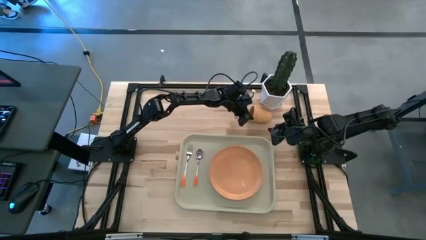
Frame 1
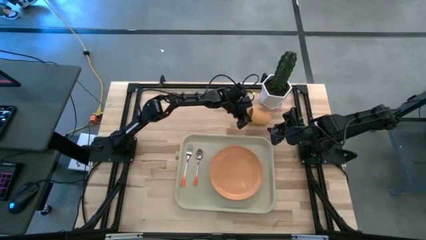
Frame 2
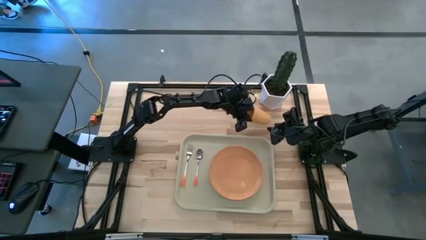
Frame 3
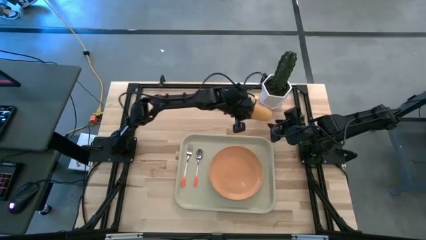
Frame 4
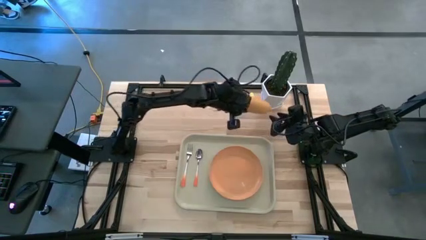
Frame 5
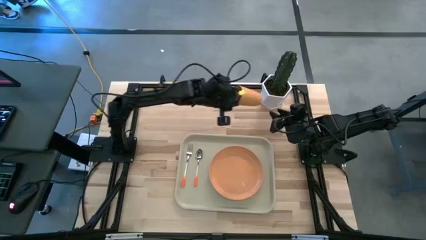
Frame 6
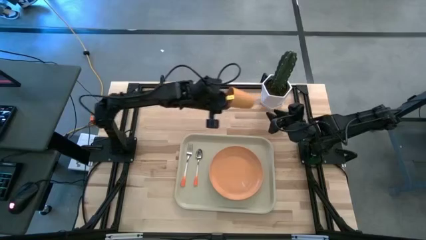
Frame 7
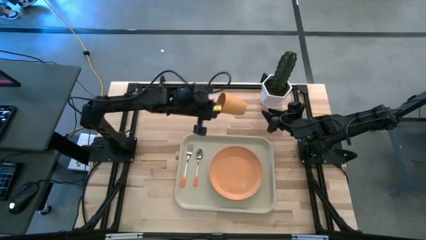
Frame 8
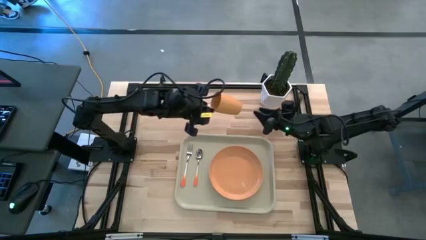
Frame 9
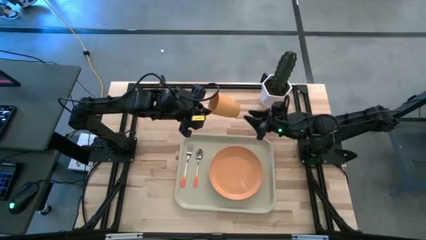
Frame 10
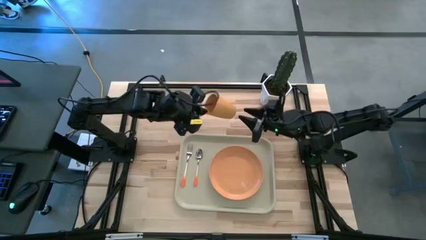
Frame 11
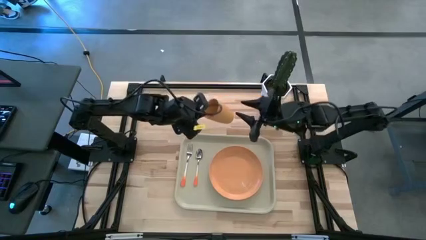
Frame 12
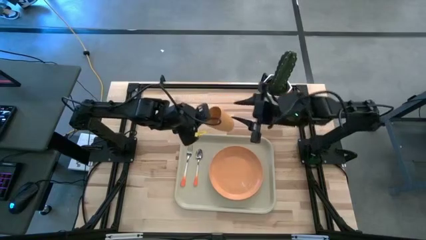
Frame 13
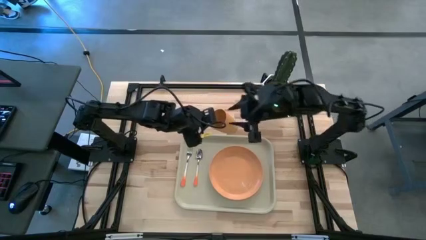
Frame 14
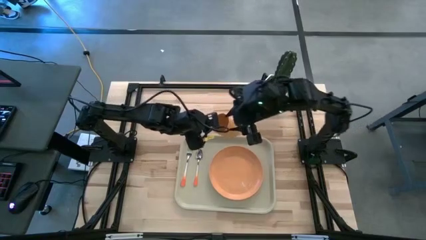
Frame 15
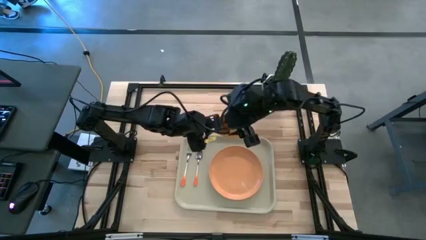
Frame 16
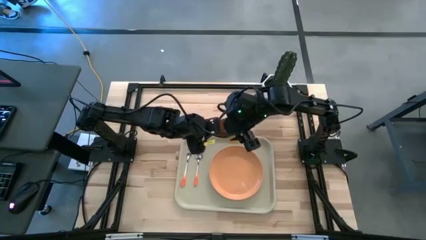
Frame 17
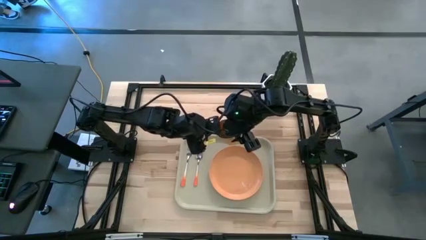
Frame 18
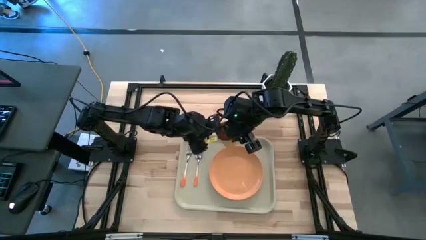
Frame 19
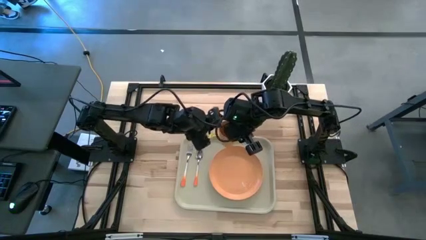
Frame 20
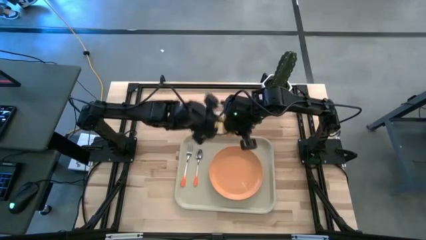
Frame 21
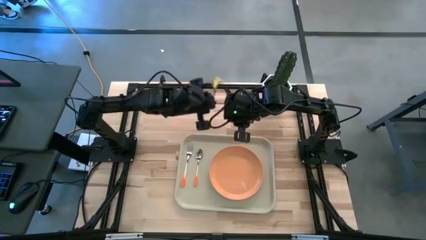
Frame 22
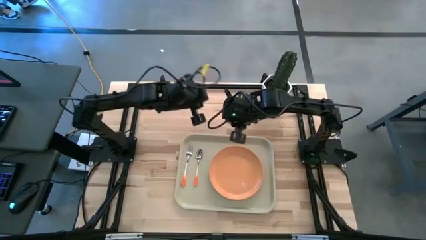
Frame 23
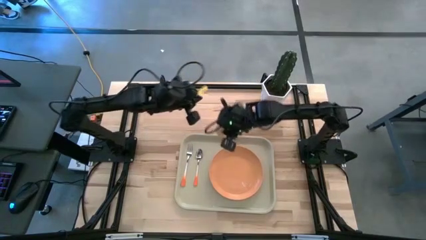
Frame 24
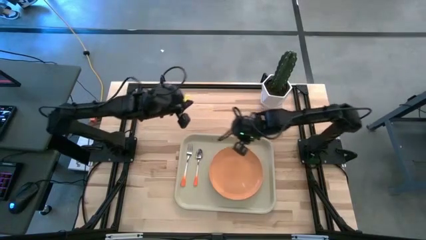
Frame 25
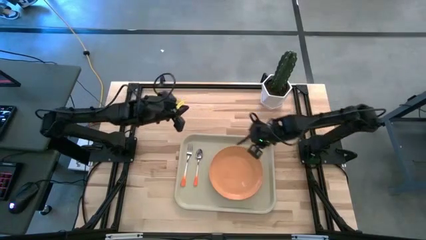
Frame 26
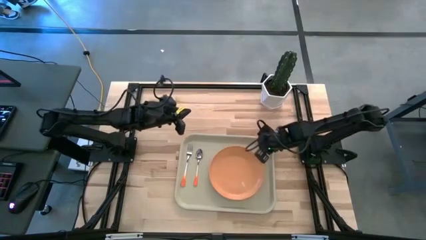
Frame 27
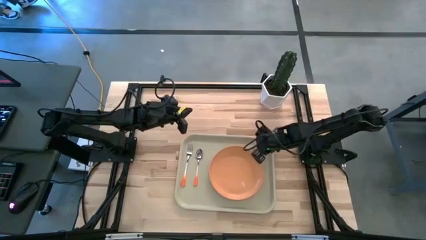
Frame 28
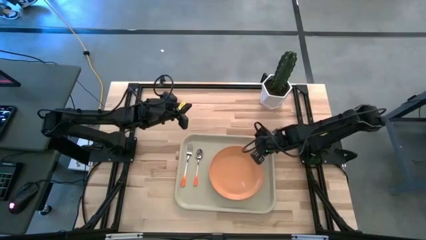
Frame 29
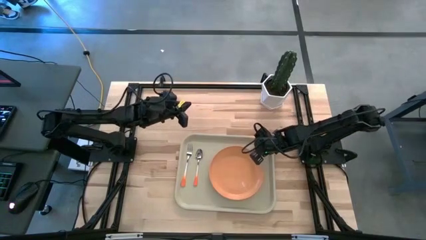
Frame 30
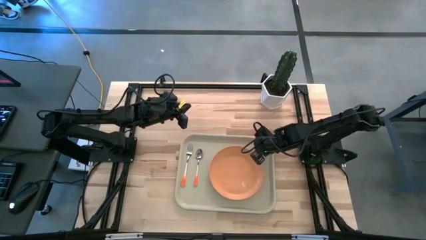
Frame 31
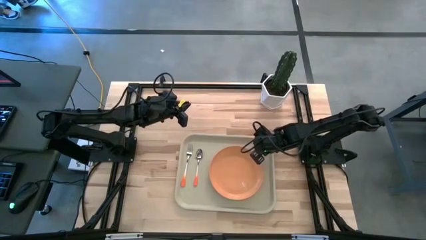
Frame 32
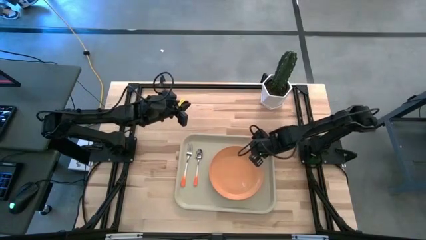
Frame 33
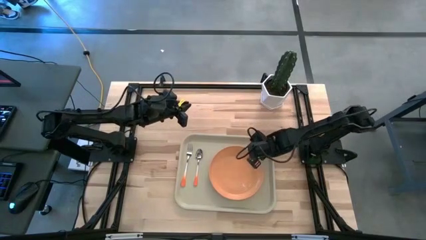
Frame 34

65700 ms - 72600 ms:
Task: Pick and place plate/cup/fork/spoon on tray
Put the orange cup on the light brown serving tray to the top right of orange plate

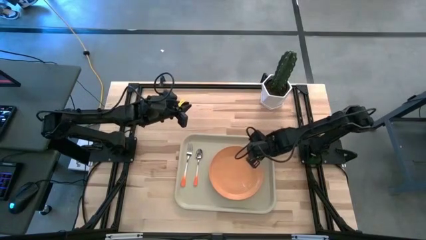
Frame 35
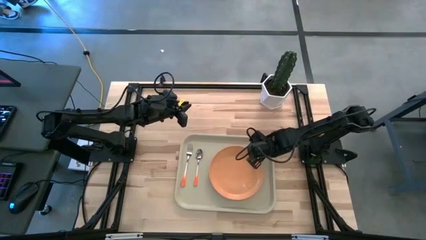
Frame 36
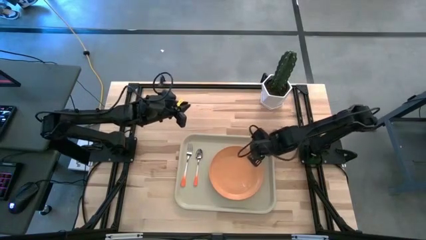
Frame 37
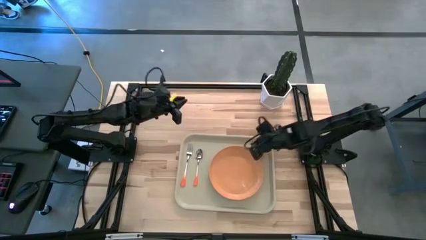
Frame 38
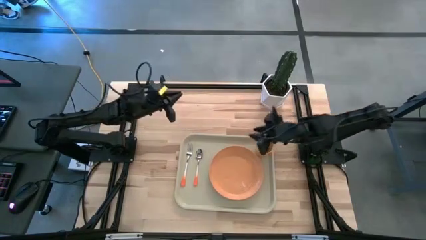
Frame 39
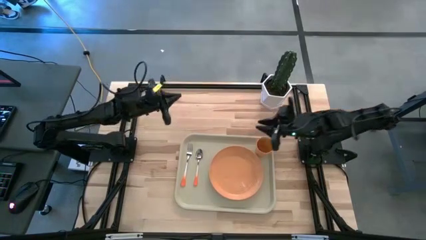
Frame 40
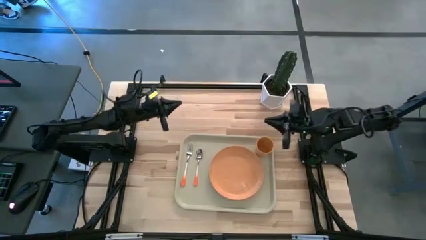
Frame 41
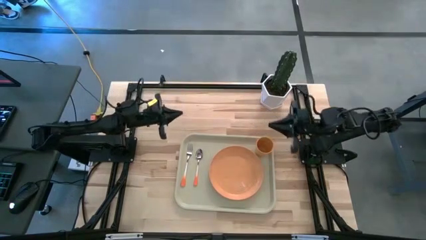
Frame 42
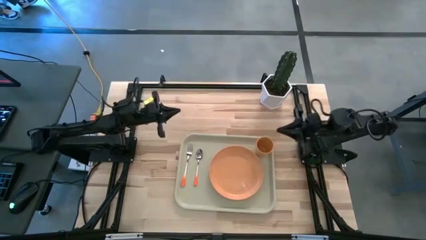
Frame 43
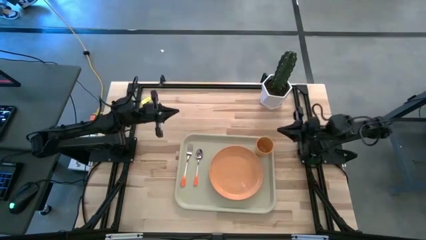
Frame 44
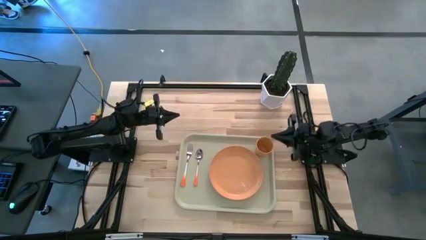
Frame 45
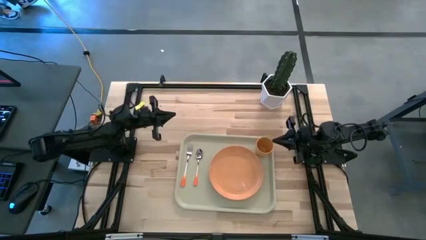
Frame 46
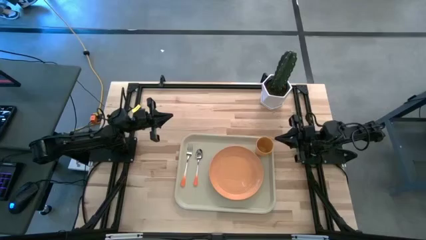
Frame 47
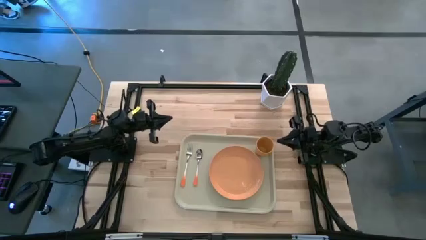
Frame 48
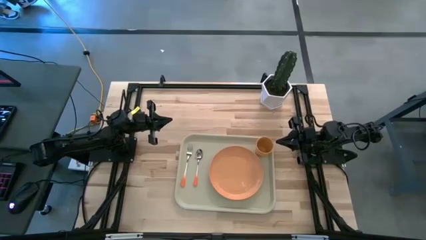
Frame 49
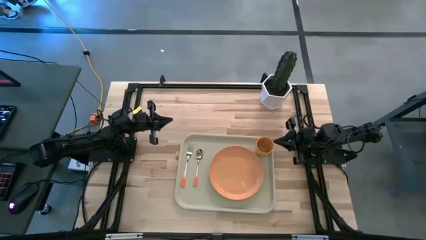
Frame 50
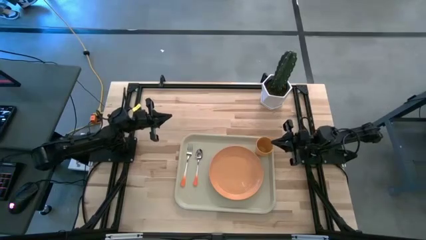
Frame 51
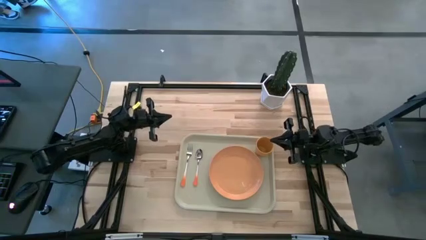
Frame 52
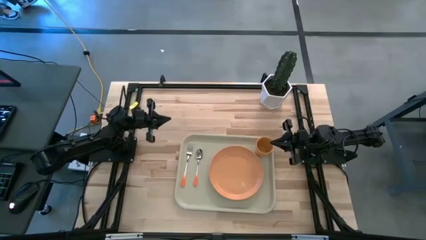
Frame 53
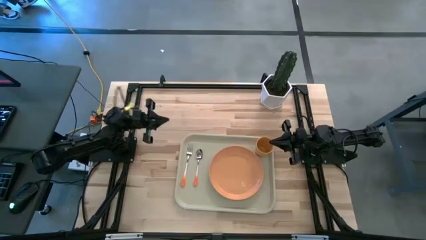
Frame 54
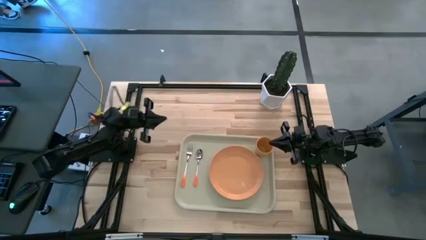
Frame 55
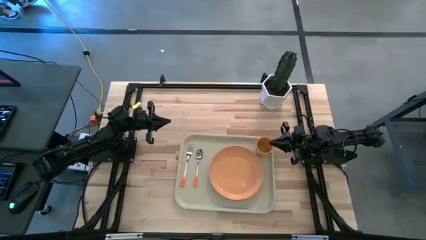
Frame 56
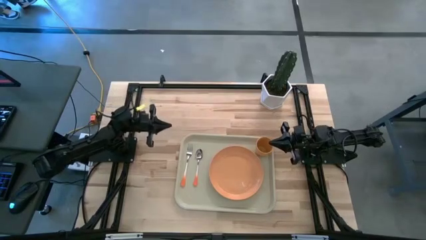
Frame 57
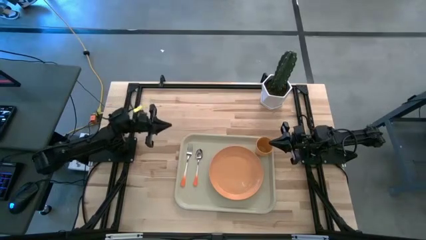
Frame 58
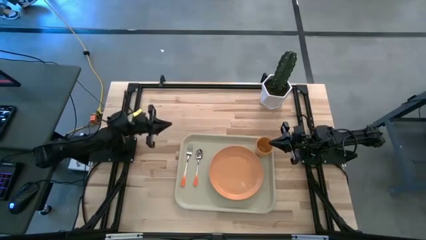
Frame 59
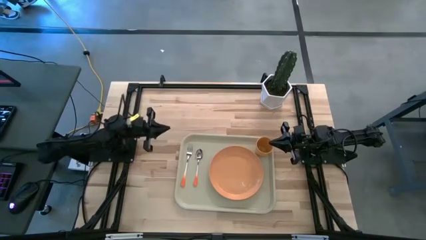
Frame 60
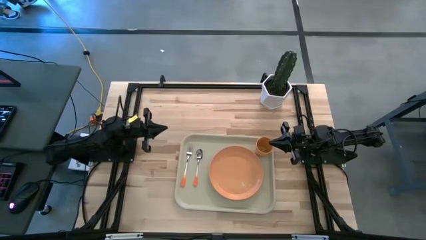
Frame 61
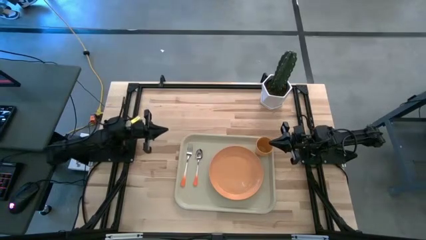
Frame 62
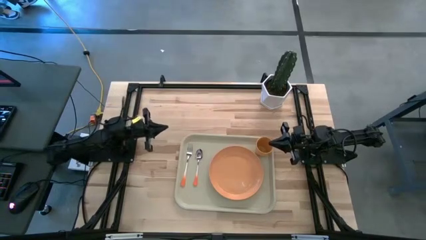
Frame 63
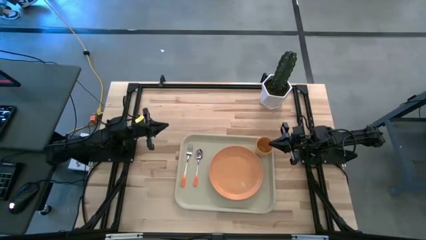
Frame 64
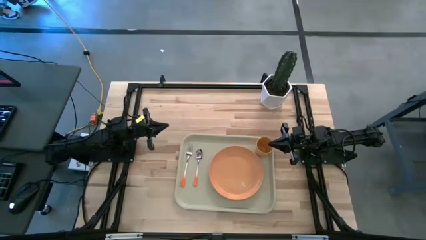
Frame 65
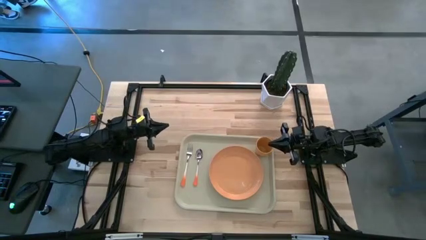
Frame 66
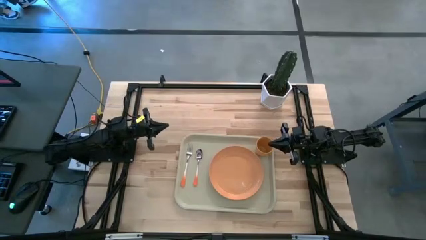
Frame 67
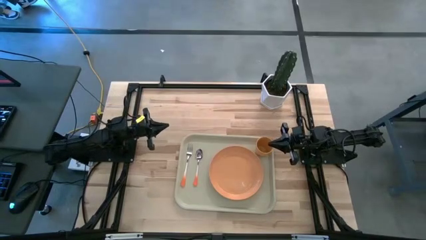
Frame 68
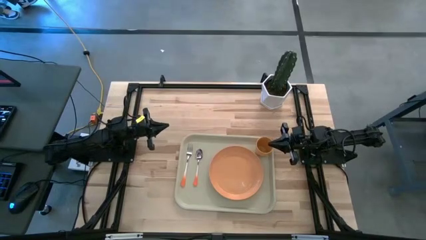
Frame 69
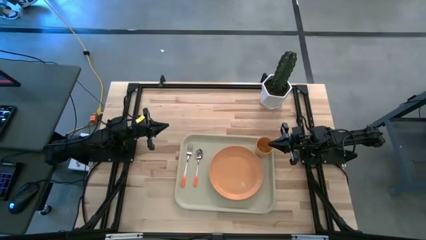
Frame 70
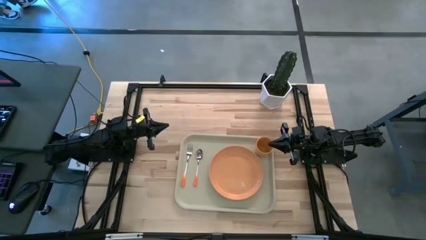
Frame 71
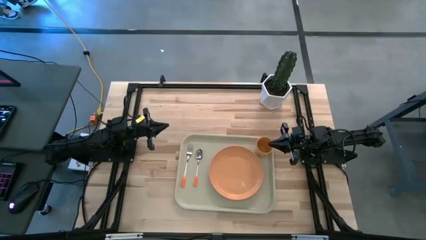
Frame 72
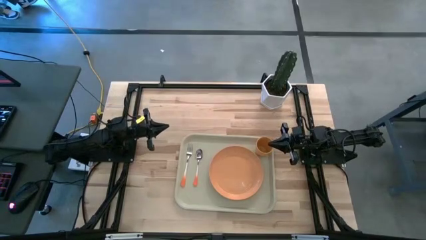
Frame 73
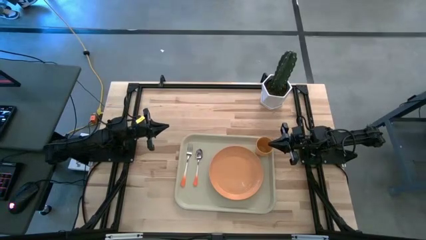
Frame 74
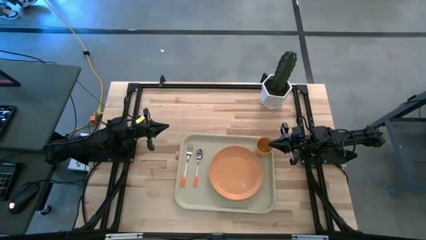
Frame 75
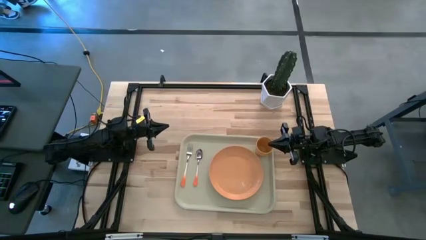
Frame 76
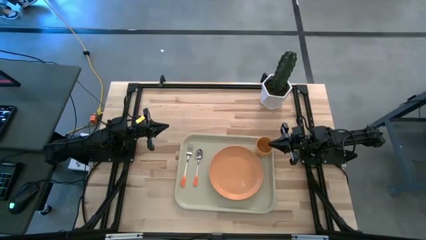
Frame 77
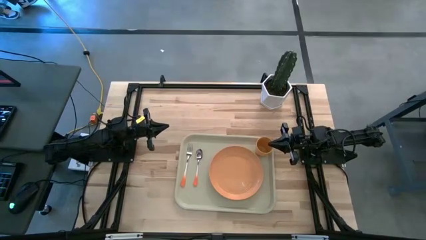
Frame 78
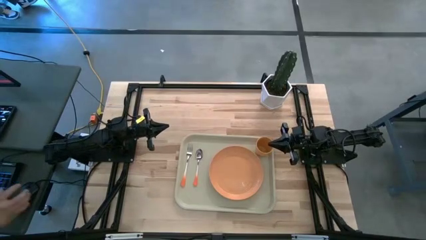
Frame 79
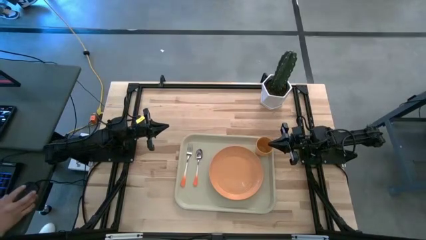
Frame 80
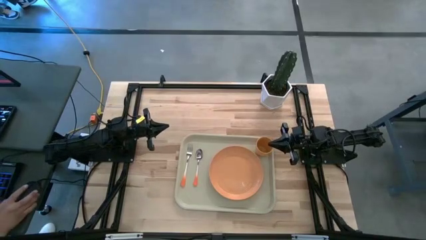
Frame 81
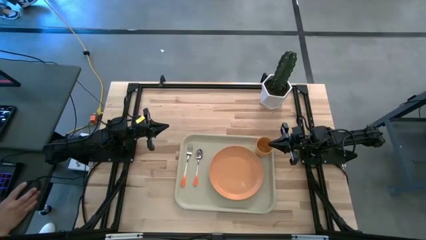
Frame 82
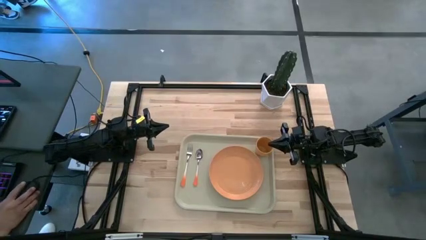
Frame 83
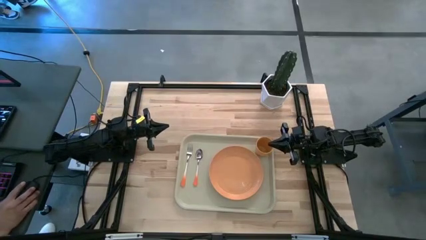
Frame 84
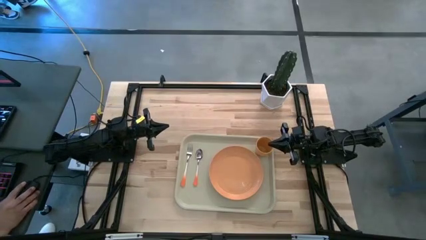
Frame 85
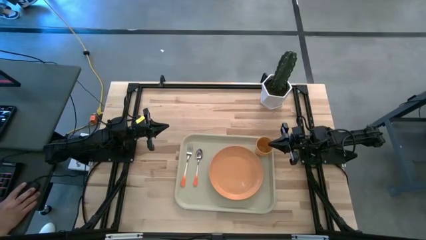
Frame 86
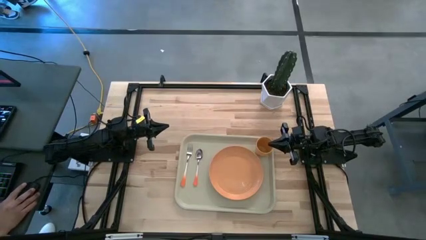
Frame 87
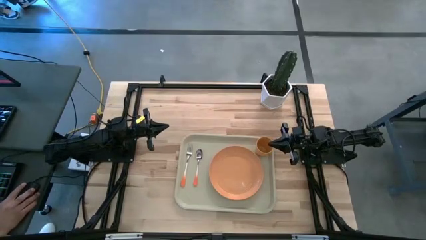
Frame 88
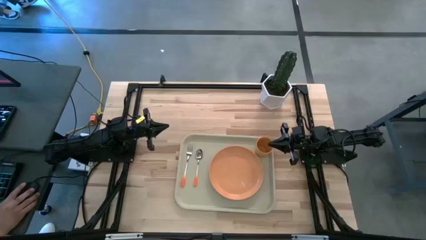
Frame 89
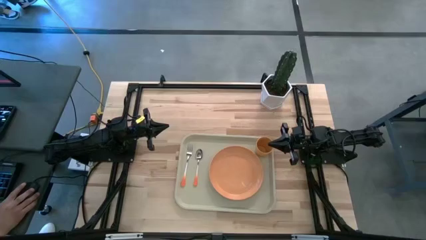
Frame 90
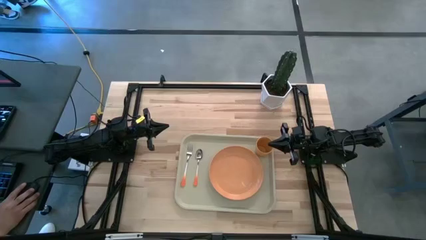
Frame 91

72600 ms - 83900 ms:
Return to Home Position
